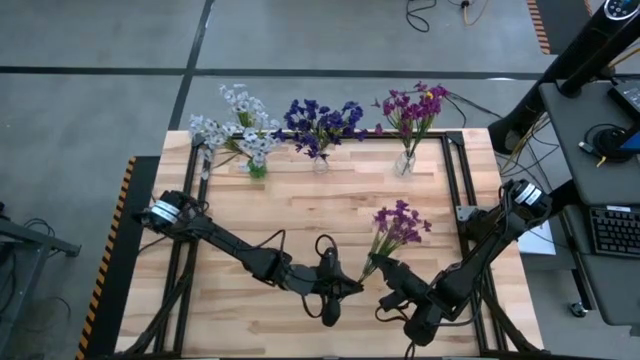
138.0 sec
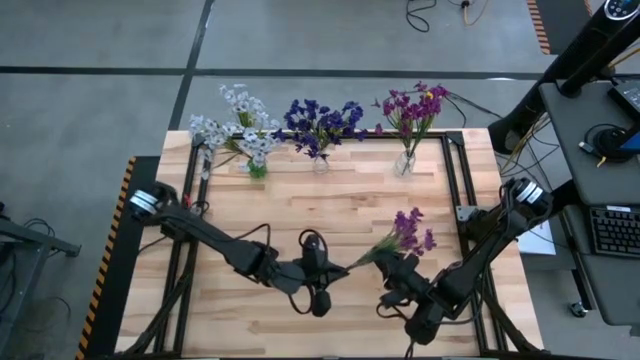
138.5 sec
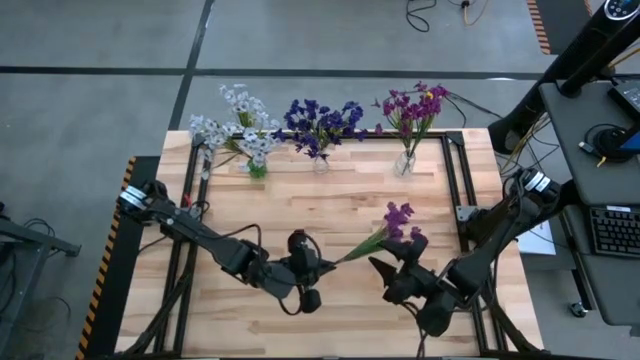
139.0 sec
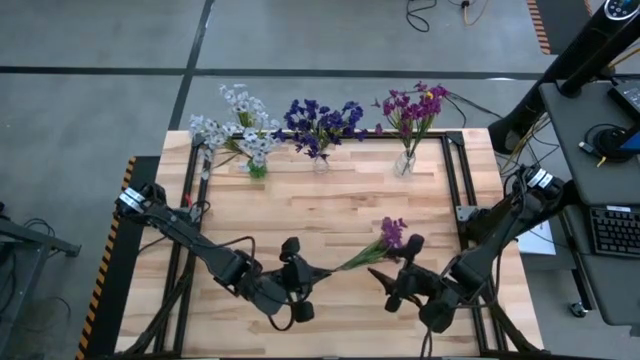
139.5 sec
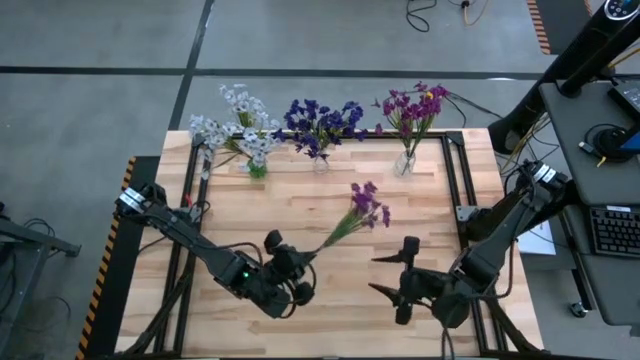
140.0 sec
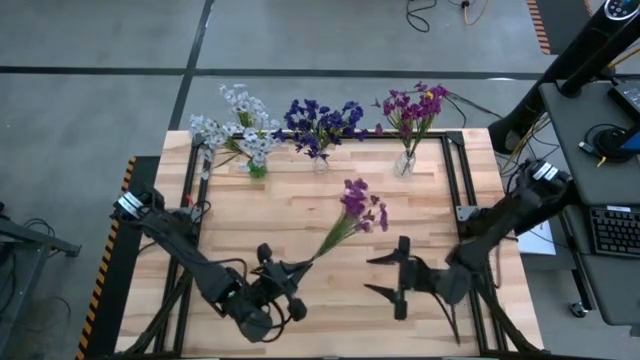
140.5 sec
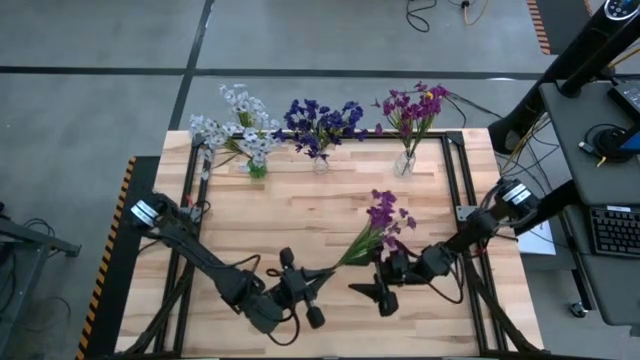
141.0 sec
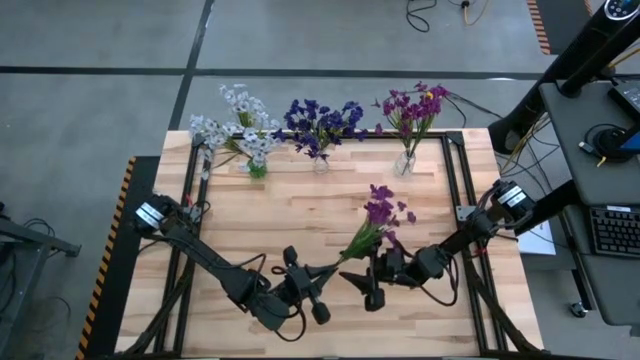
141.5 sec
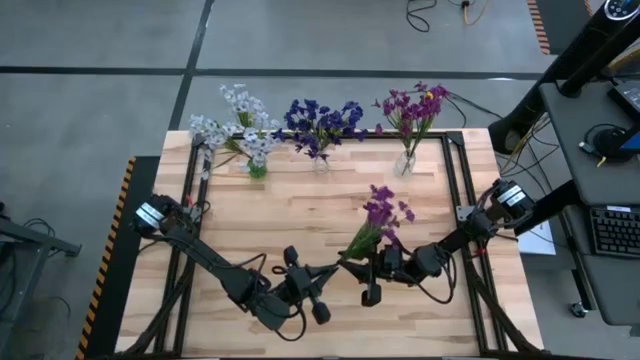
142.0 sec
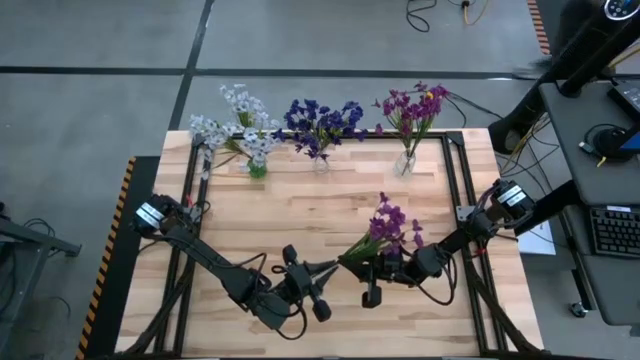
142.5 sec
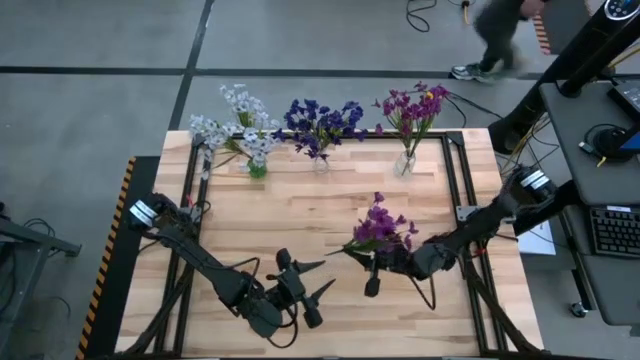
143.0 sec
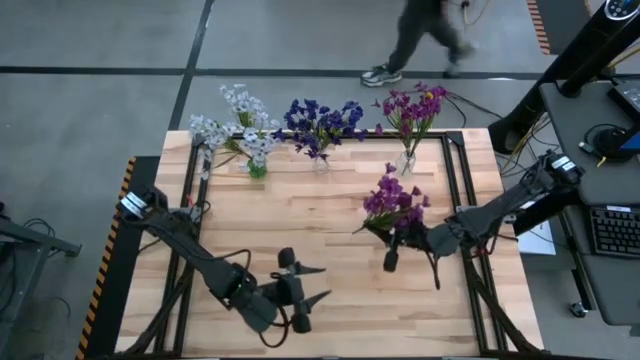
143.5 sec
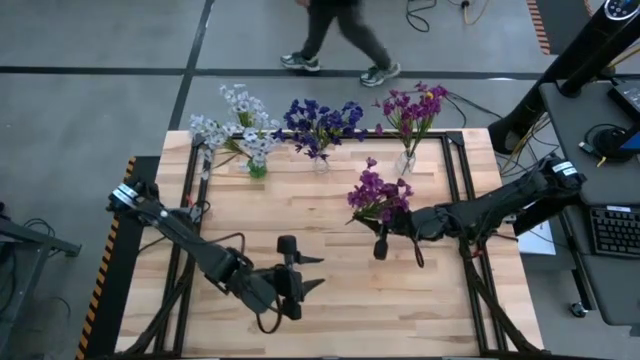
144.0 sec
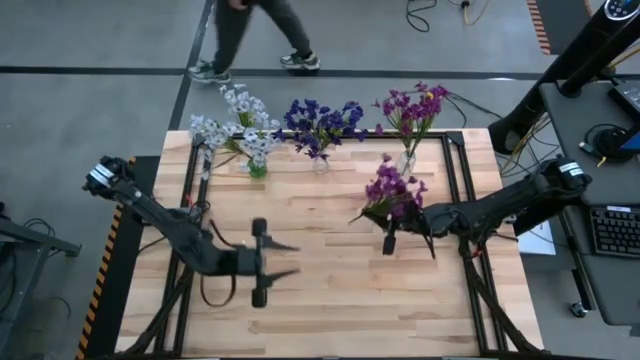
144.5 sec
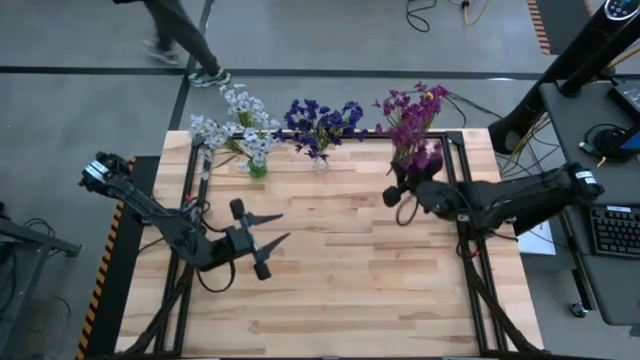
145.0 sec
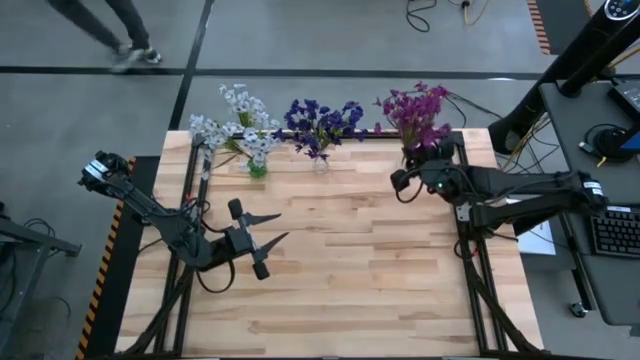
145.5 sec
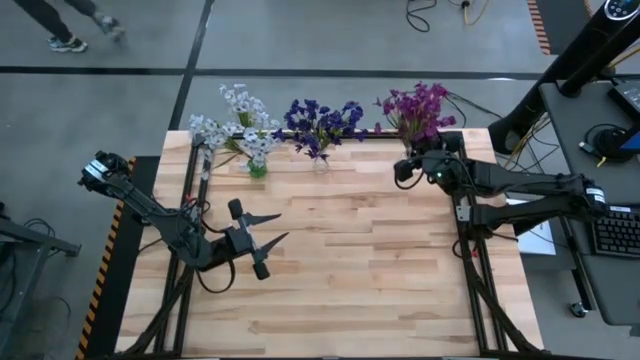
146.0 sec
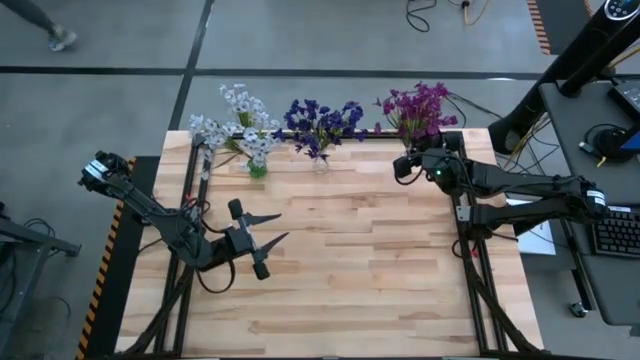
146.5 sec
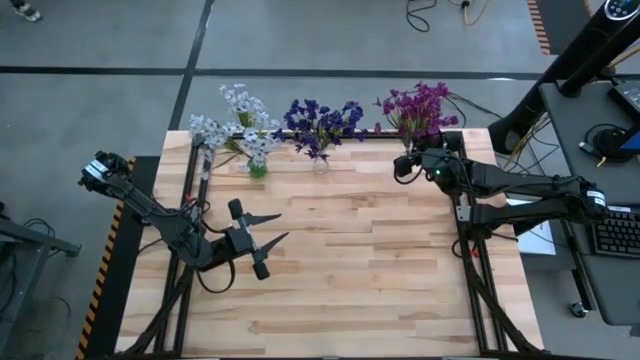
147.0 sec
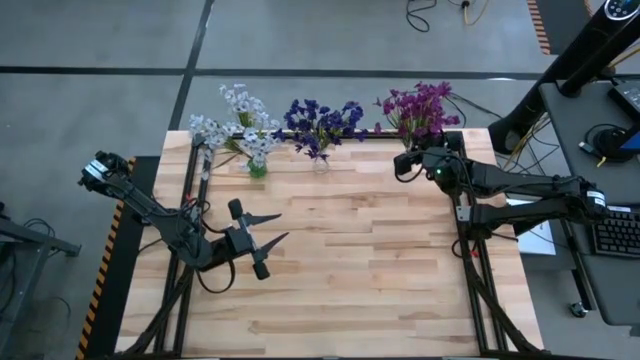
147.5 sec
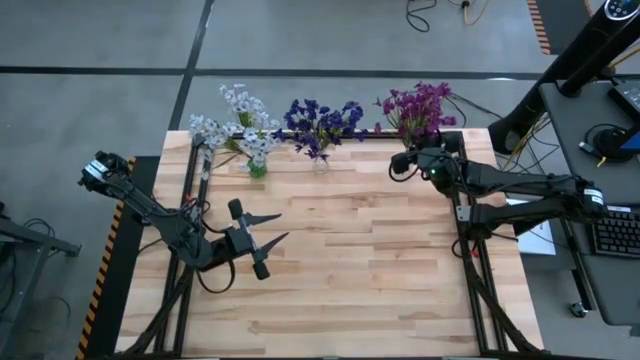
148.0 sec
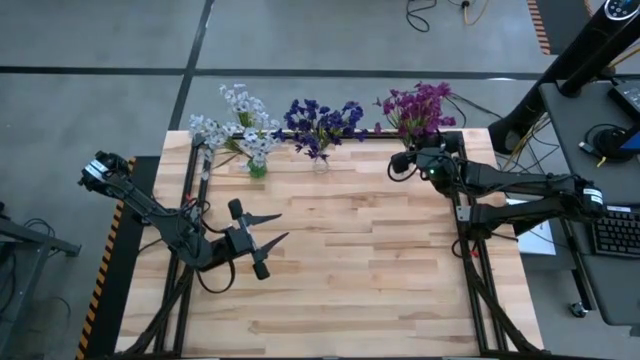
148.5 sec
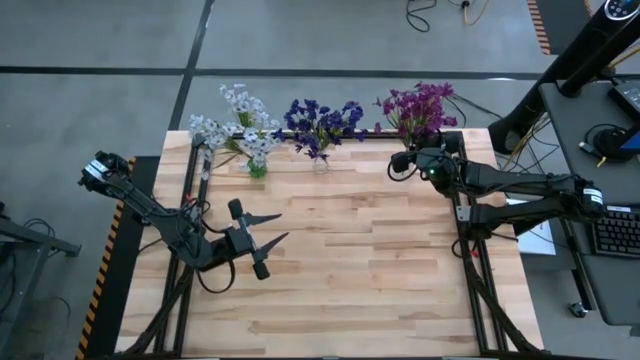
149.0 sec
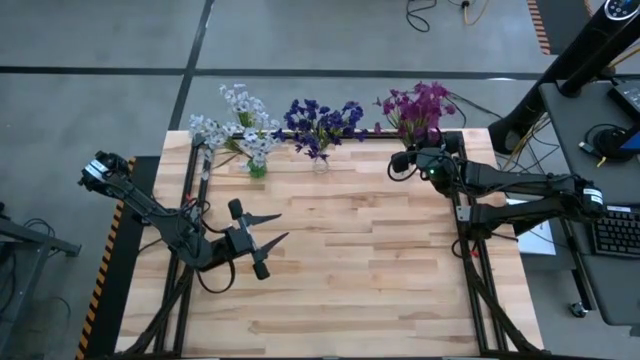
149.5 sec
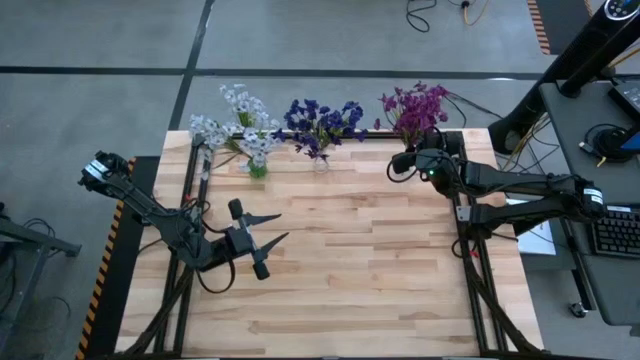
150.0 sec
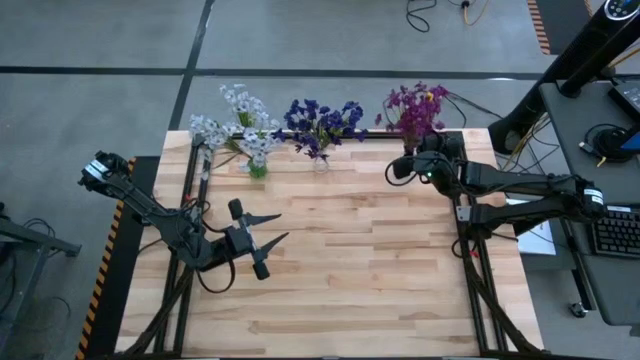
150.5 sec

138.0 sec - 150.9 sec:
Task: Sort flowers into vase by color
Put the light violet flowers into the right transparent vase

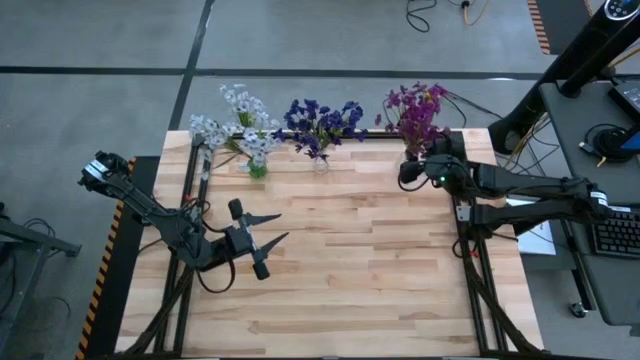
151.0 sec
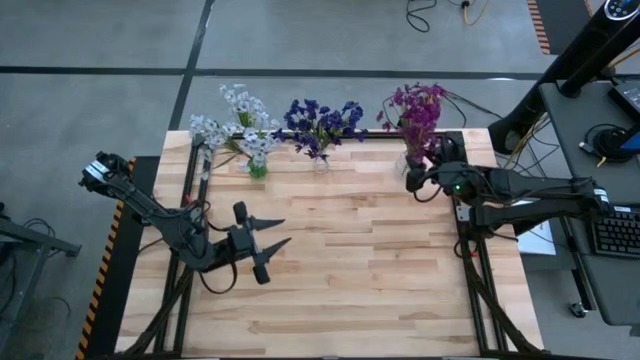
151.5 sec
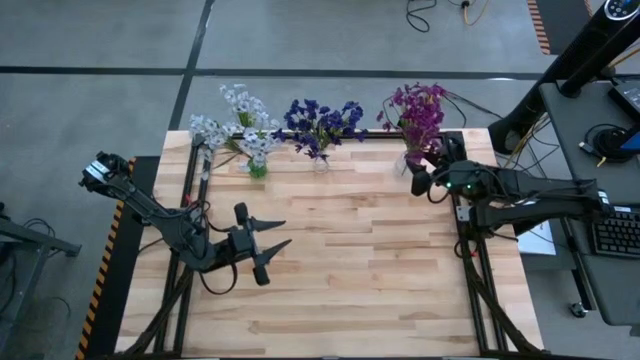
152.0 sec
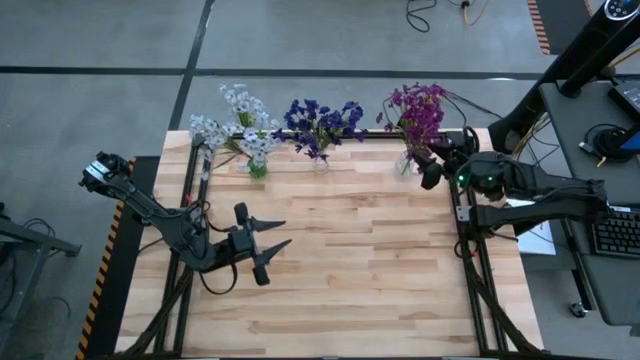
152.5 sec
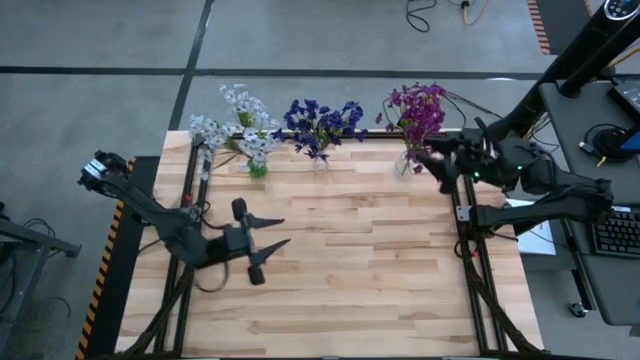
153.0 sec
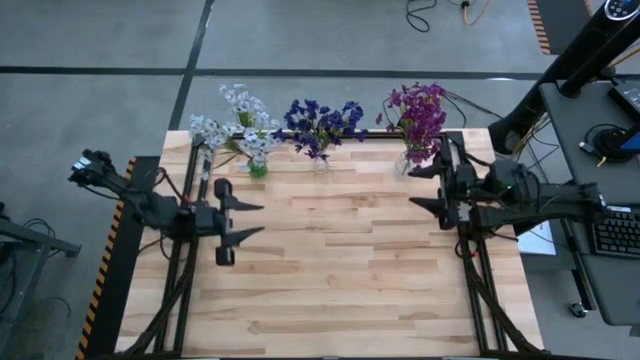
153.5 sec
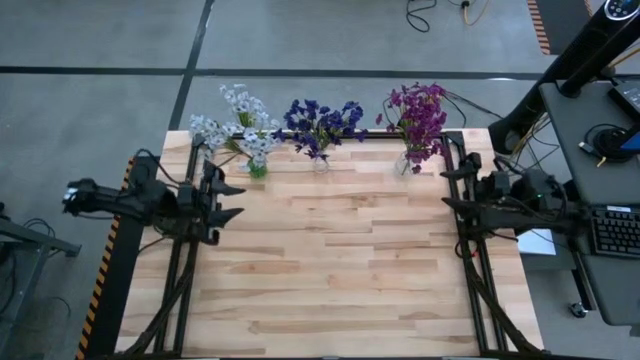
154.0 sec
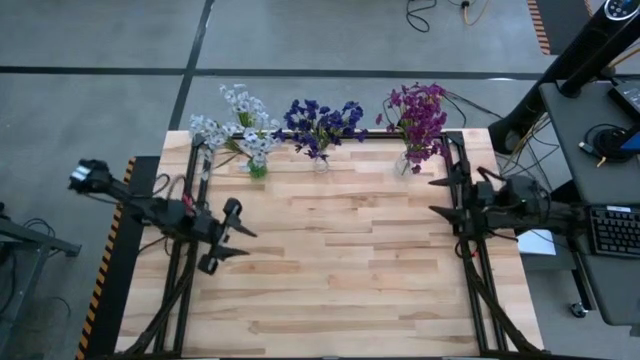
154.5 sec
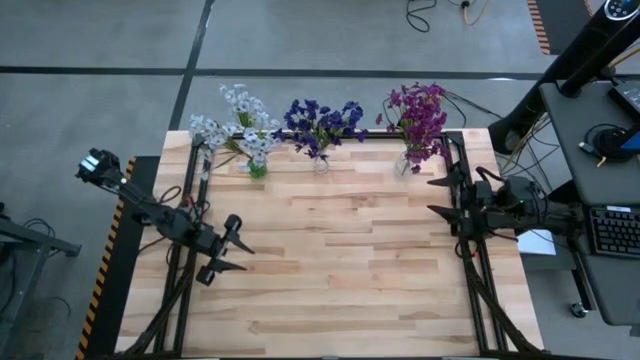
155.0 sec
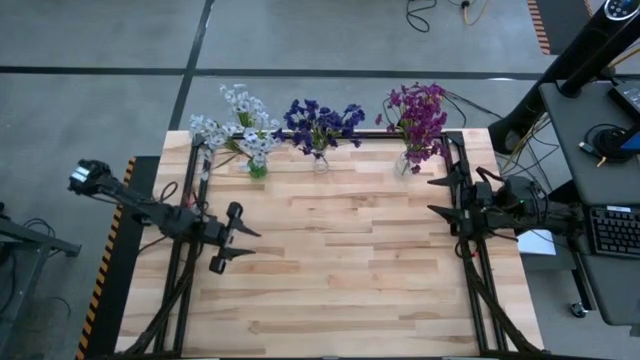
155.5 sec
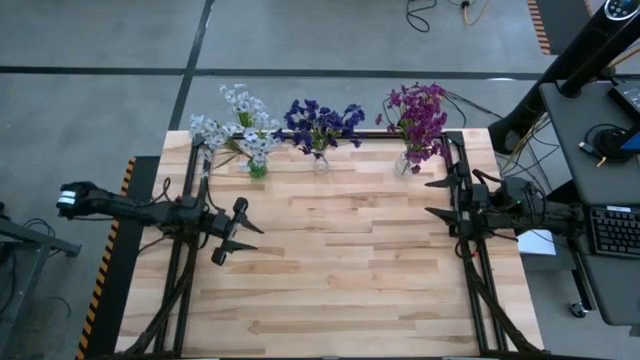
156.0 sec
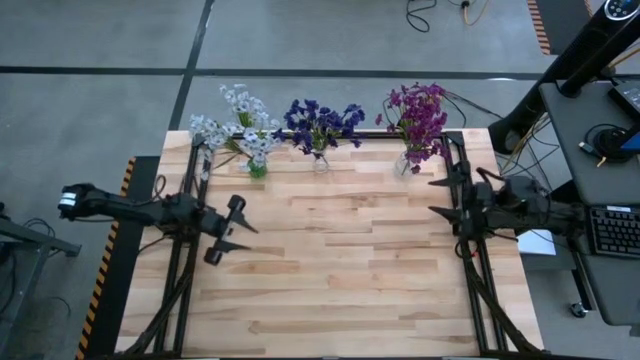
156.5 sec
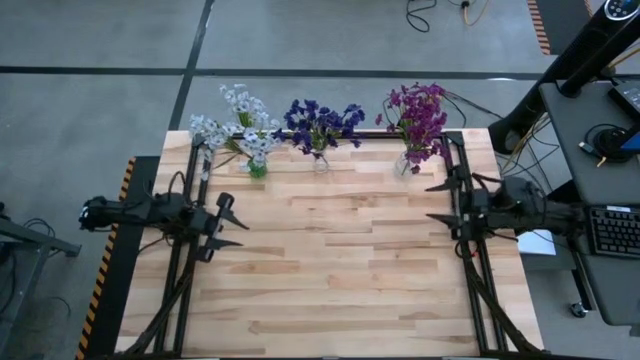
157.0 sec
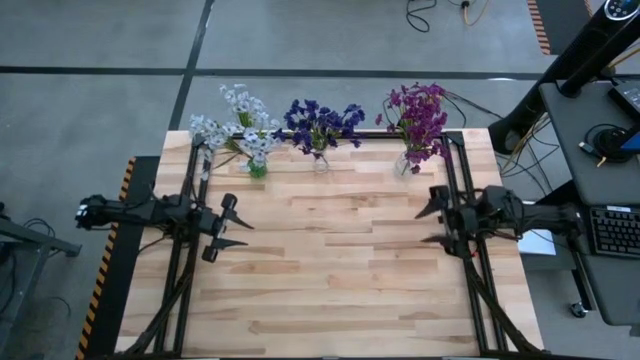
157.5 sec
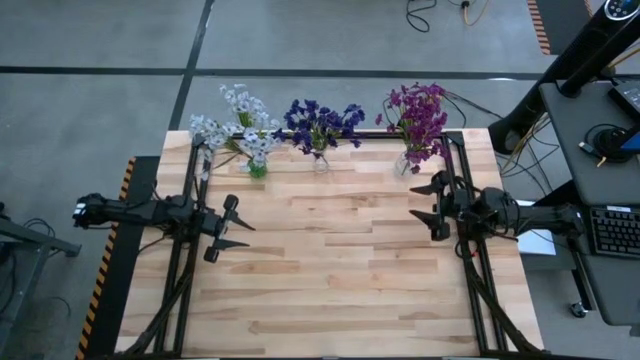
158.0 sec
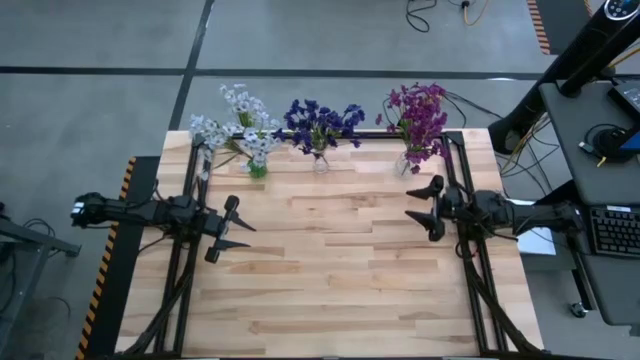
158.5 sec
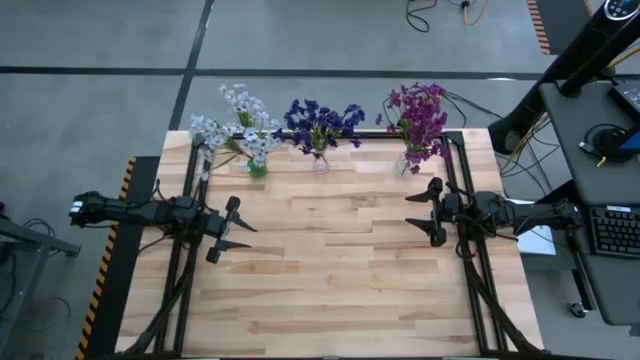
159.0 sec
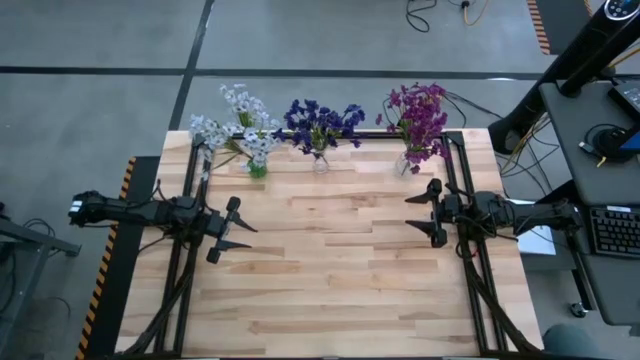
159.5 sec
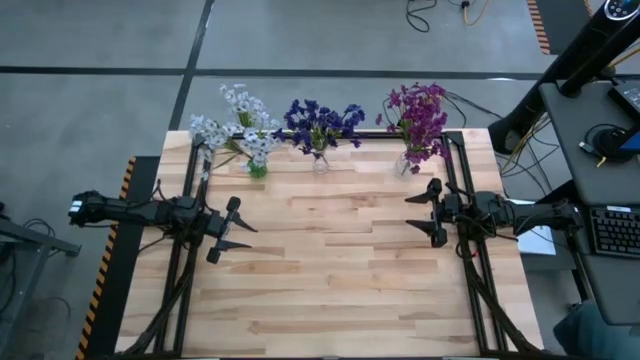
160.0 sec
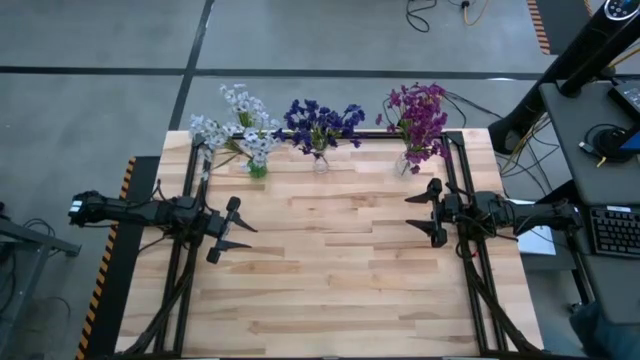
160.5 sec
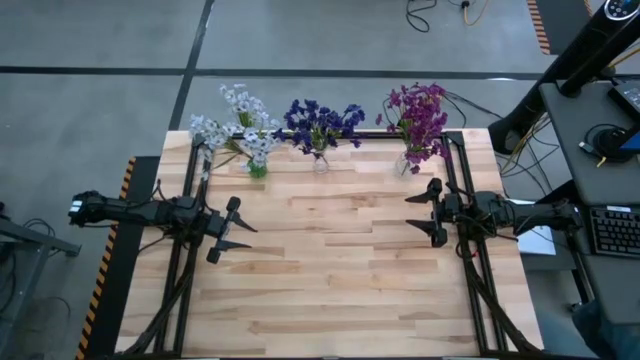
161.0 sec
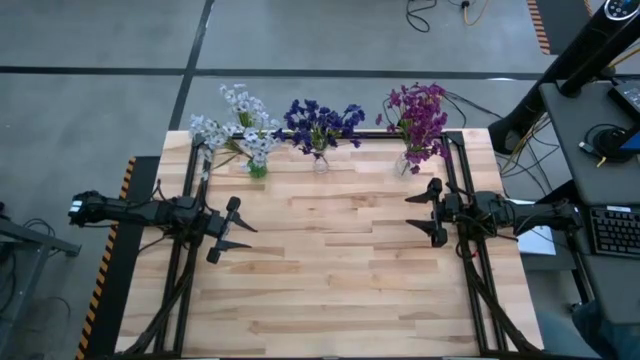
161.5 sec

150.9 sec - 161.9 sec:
Return to Home Position
